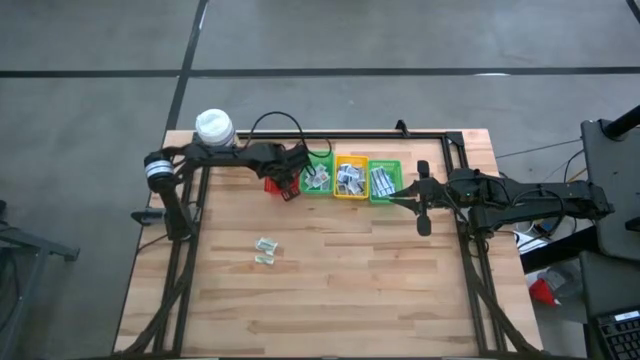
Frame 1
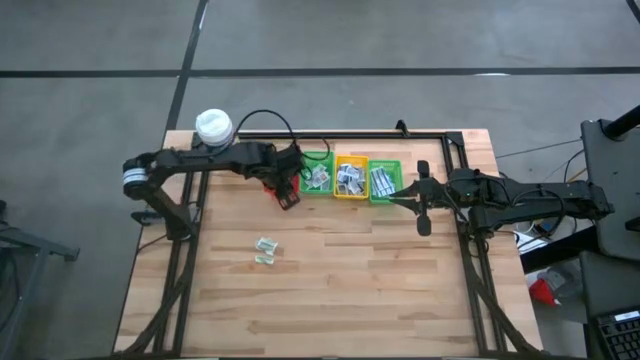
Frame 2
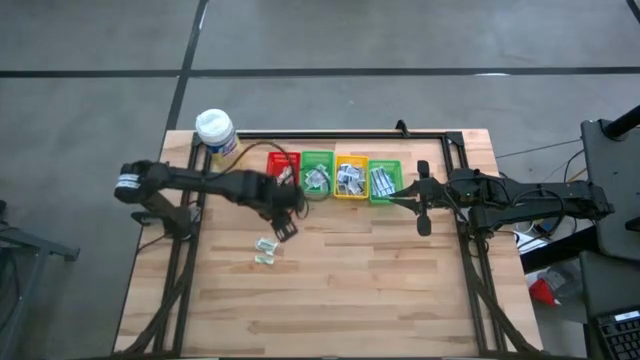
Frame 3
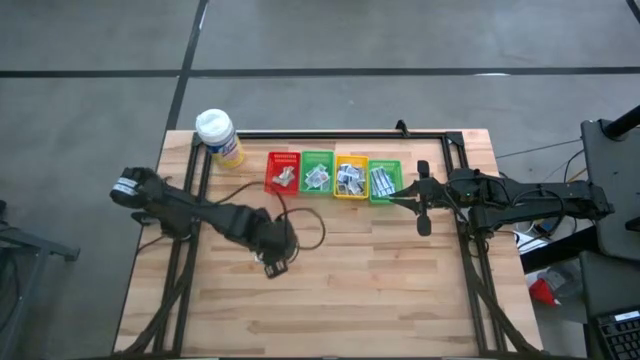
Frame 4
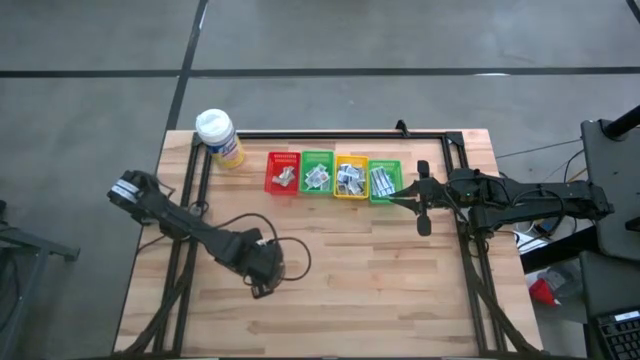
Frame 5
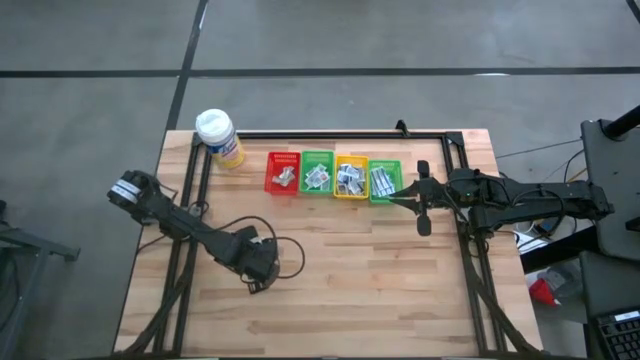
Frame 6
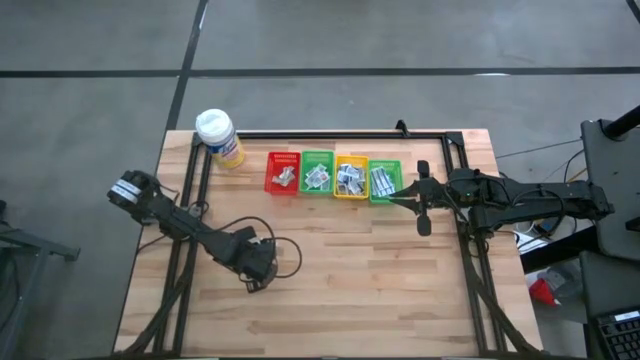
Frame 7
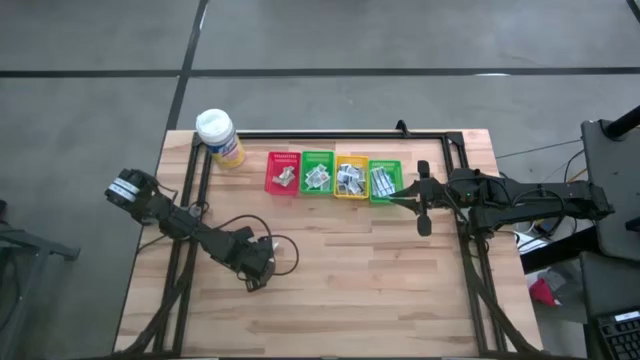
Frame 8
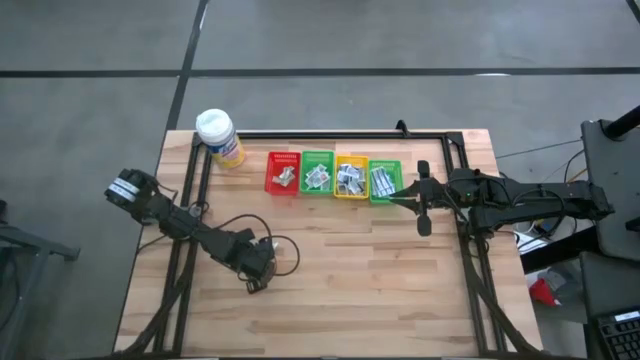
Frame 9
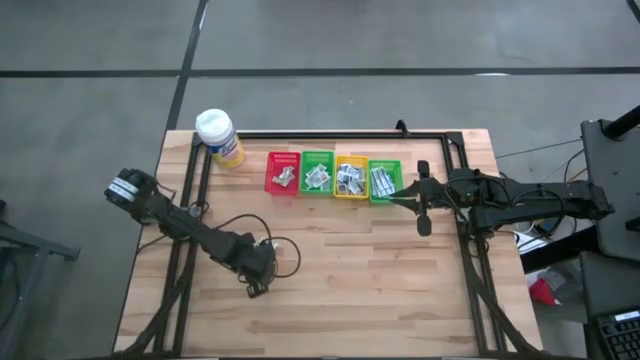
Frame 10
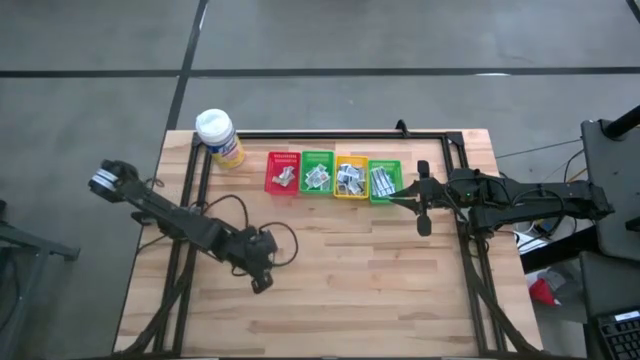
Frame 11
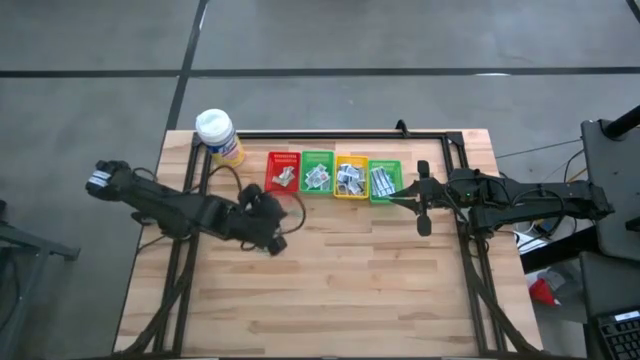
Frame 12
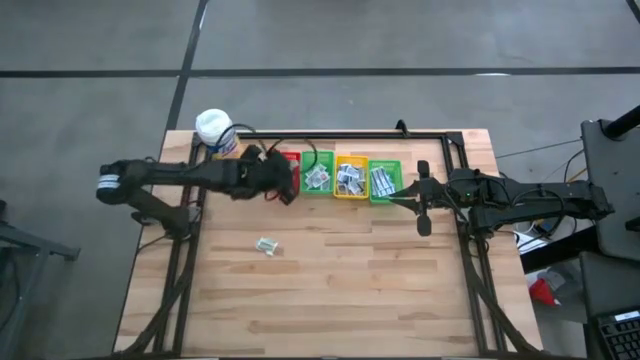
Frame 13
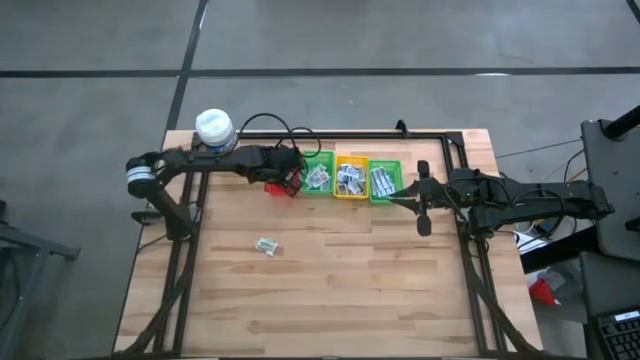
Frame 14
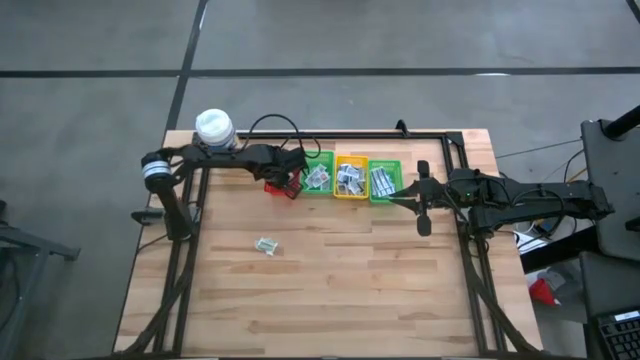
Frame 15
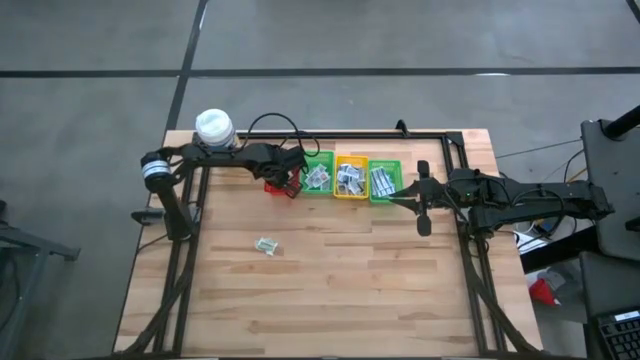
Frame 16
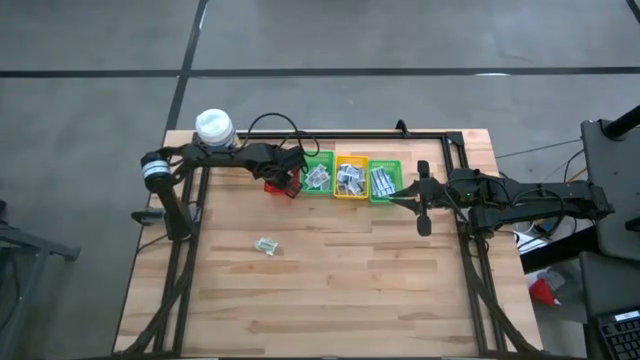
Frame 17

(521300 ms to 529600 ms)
Task: Pick & Place First Aid Supplies
Put the green bandage into the red bin

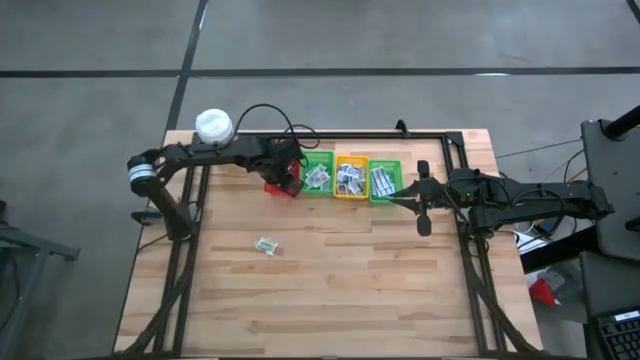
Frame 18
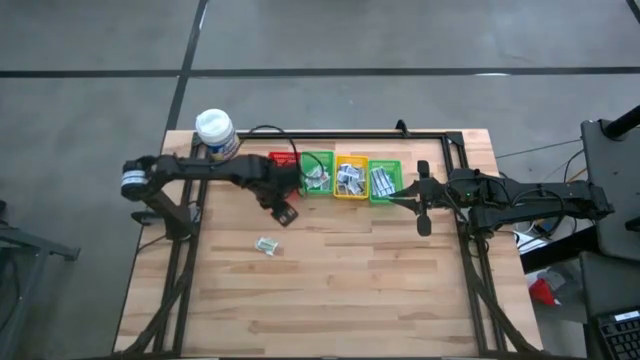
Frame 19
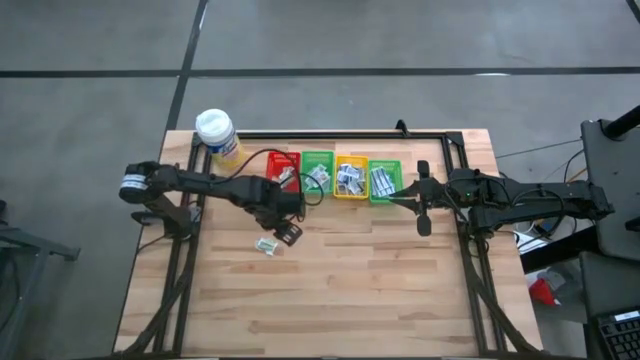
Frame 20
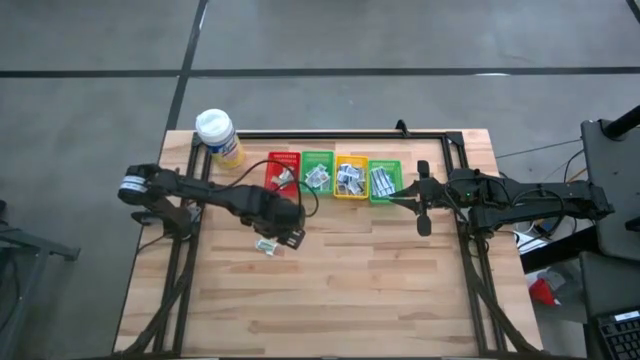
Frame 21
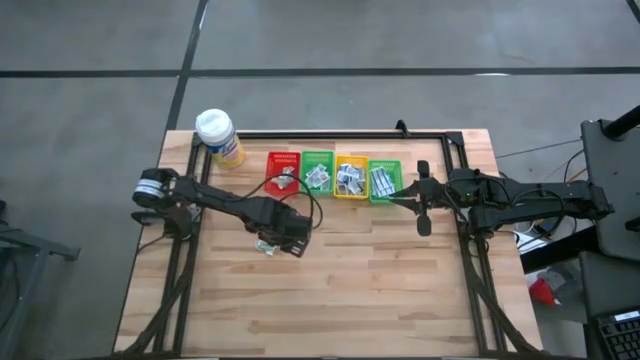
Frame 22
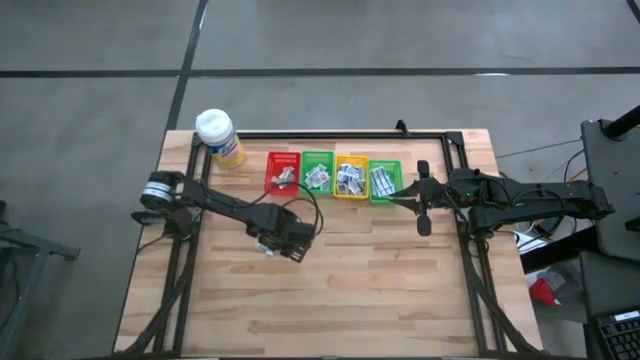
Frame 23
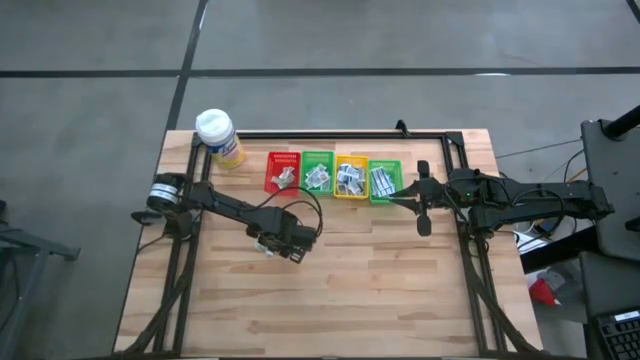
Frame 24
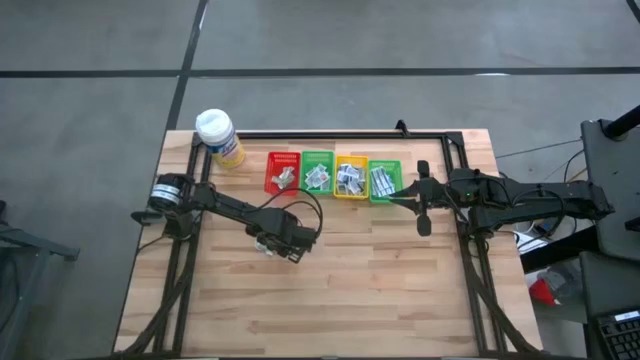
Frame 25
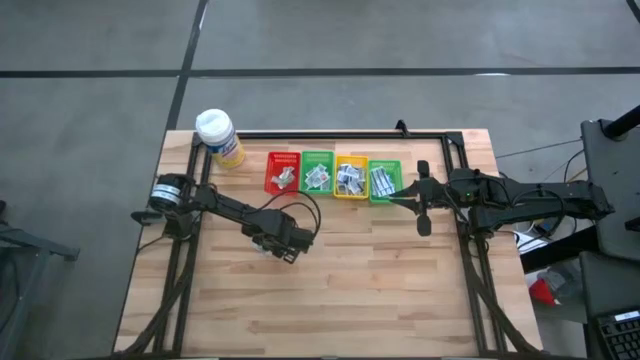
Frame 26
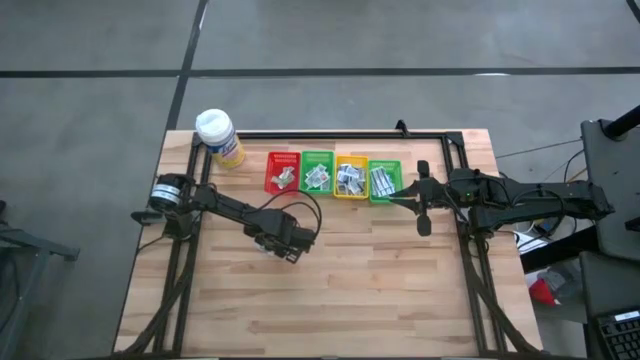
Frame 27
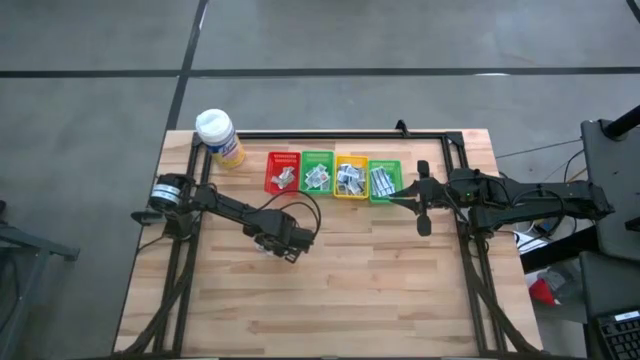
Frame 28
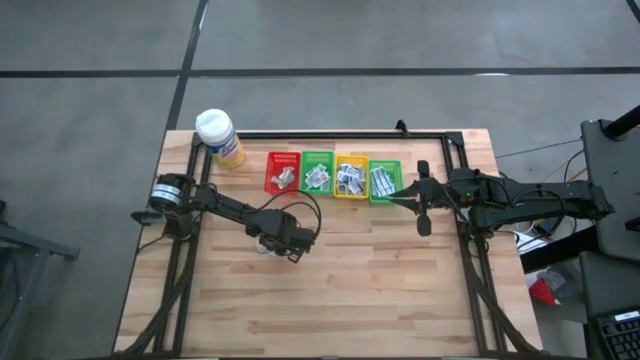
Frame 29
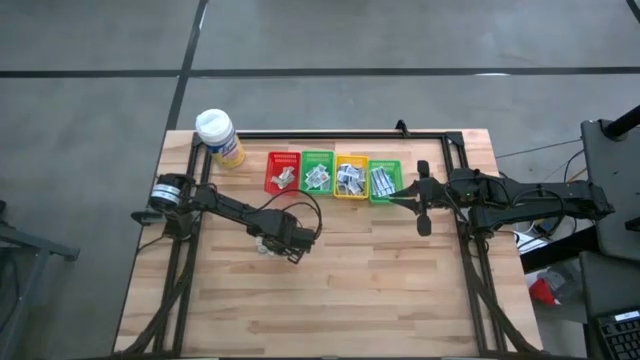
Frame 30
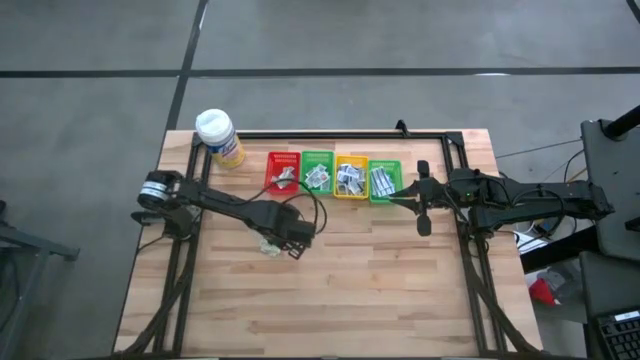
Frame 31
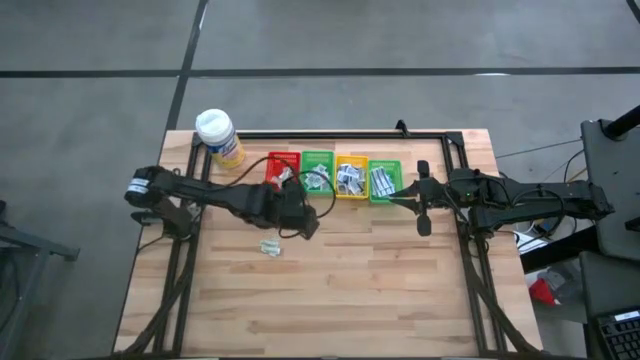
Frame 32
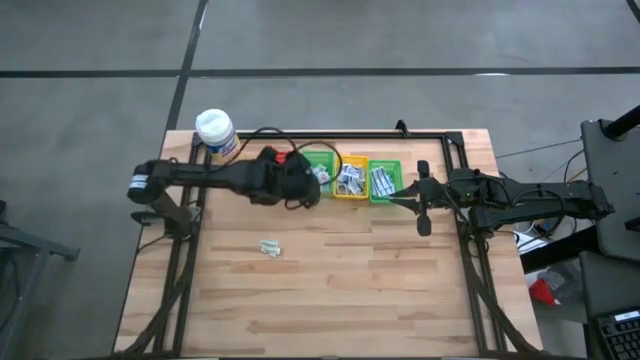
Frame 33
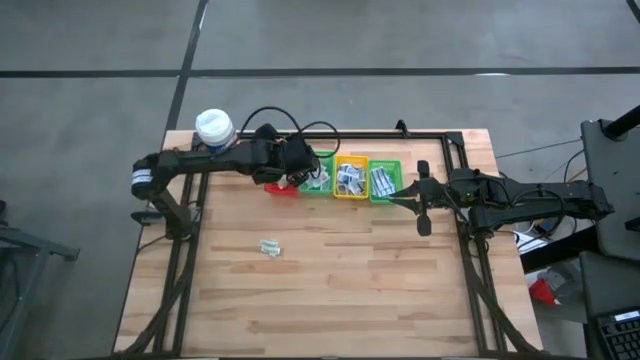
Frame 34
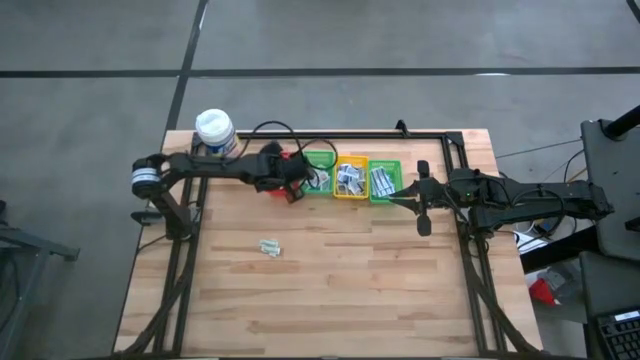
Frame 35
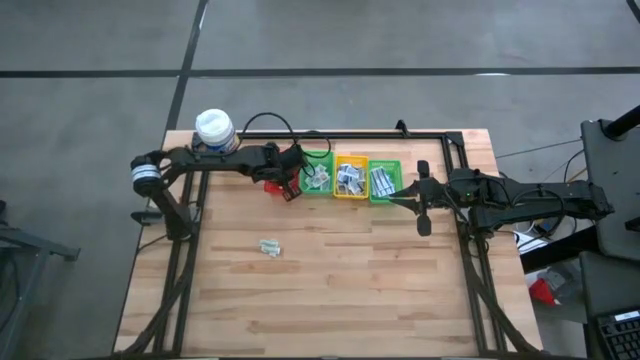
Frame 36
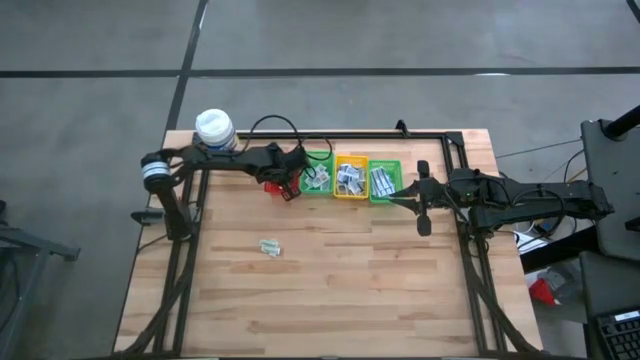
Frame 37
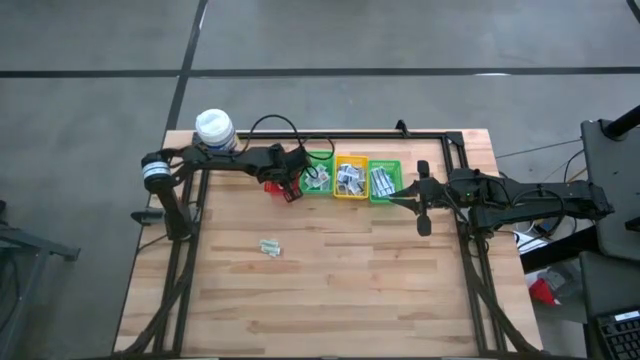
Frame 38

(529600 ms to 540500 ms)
Put the green bandage into the red bin
